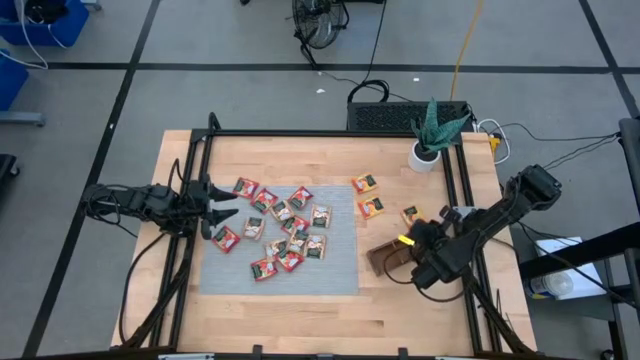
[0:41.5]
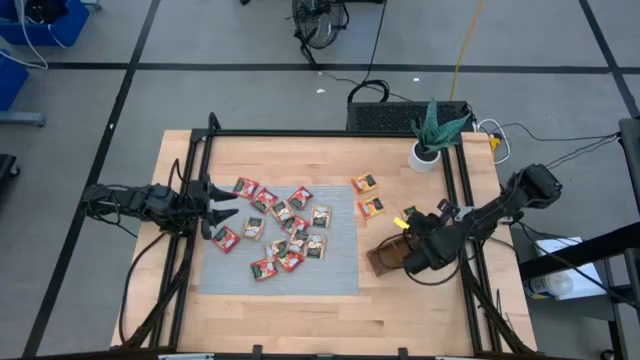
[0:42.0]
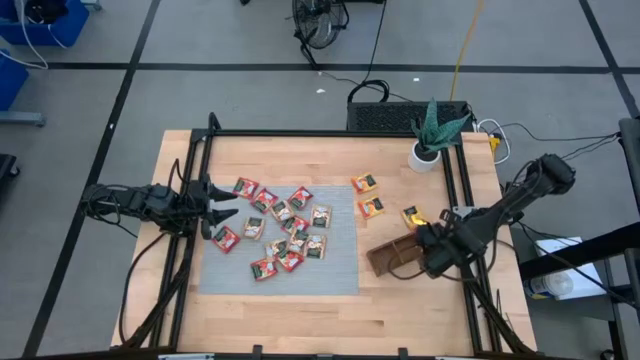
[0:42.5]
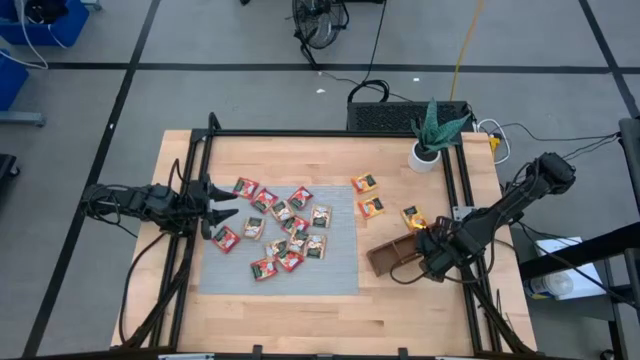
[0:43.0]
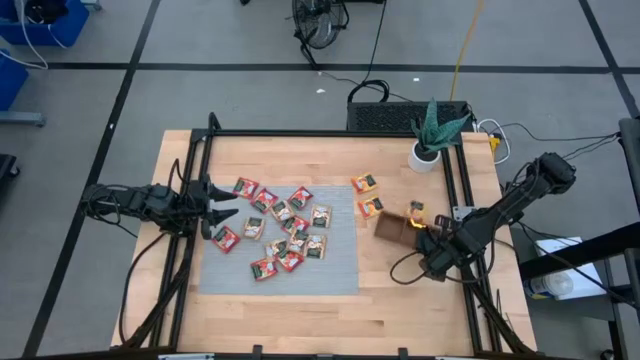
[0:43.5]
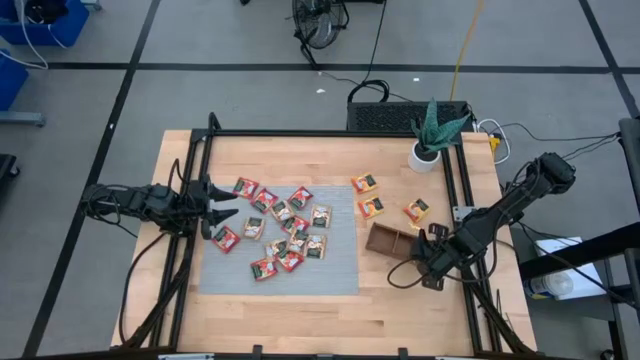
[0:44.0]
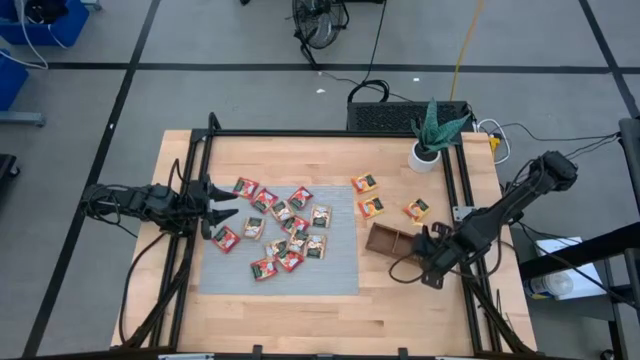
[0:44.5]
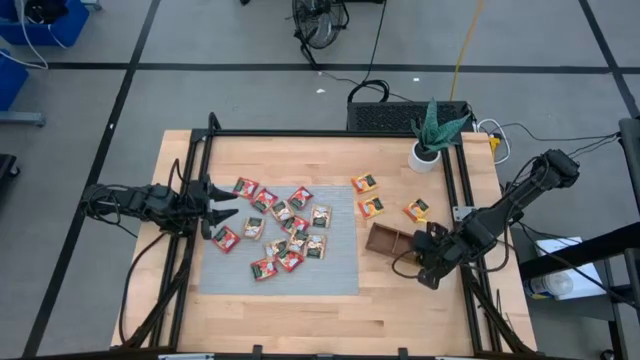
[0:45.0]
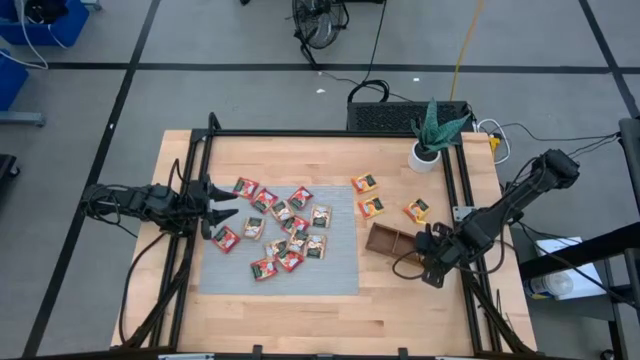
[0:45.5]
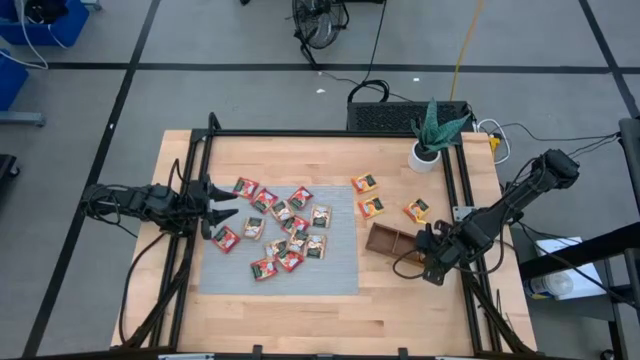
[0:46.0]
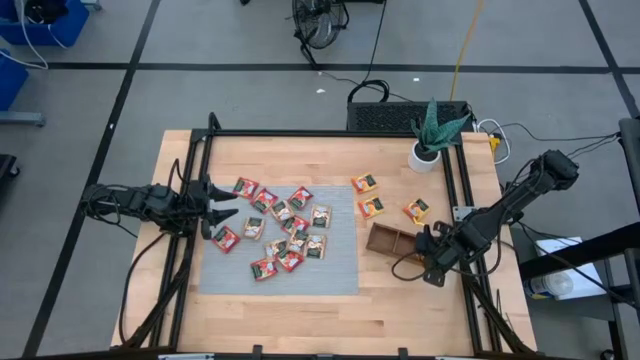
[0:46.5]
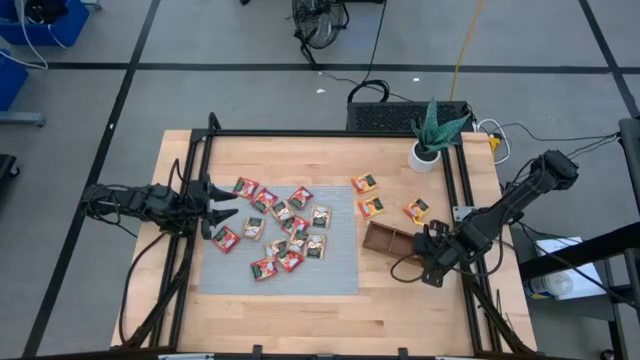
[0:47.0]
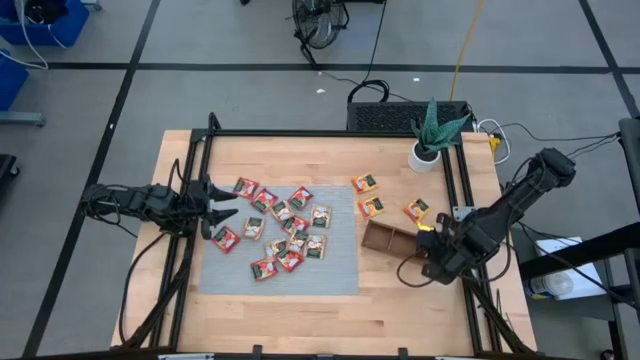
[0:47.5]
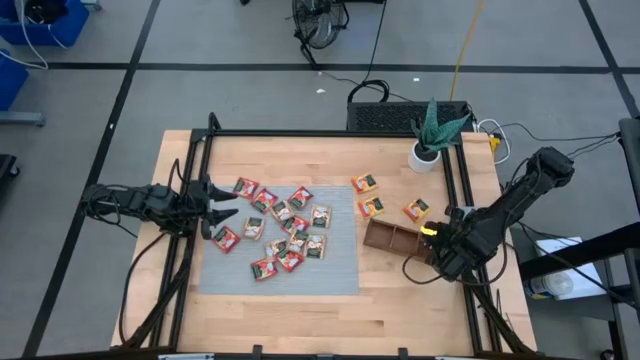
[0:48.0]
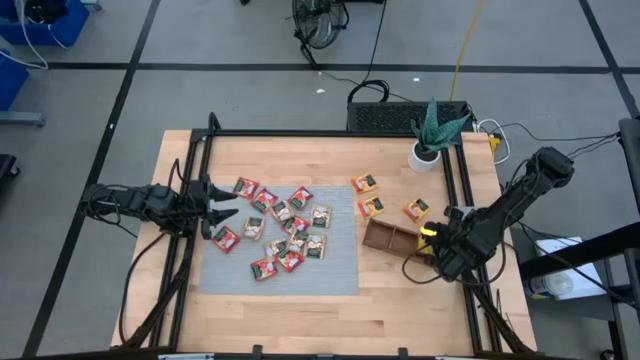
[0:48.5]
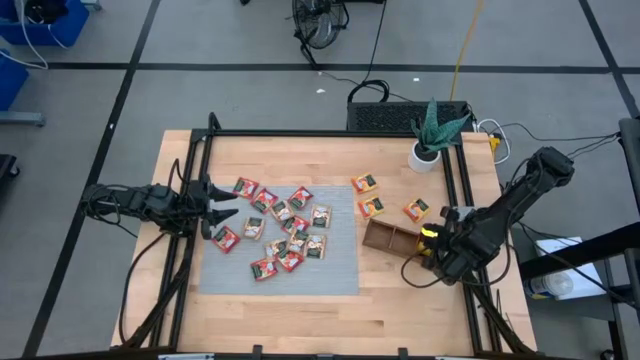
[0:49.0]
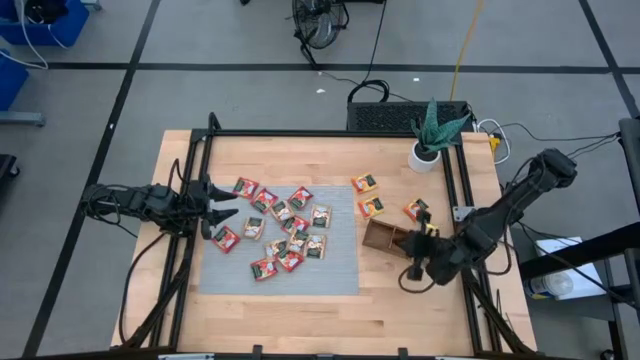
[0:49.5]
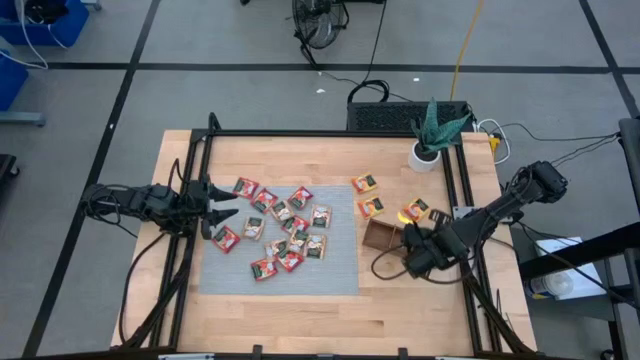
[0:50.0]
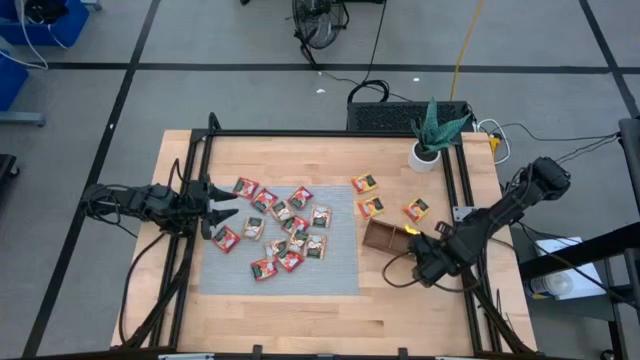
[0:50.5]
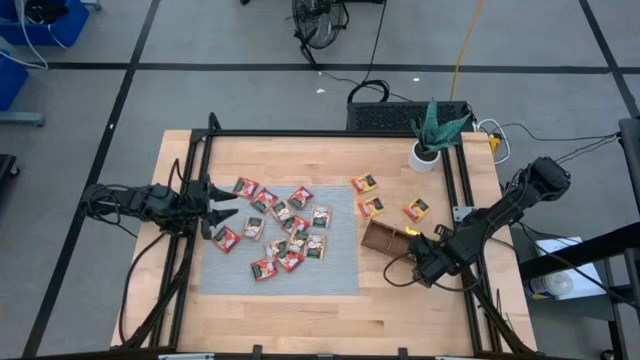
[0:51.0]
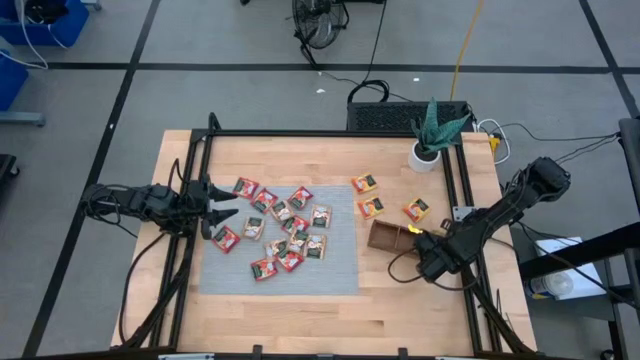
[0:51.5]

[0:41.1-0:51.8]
Task: Pick & Place Tea
Adjust the yellow tea bag in the right section of the wooden organizer

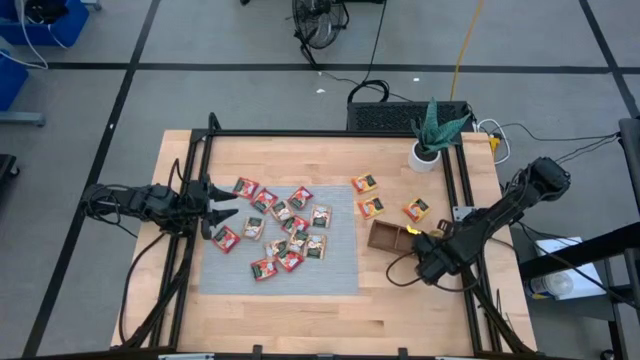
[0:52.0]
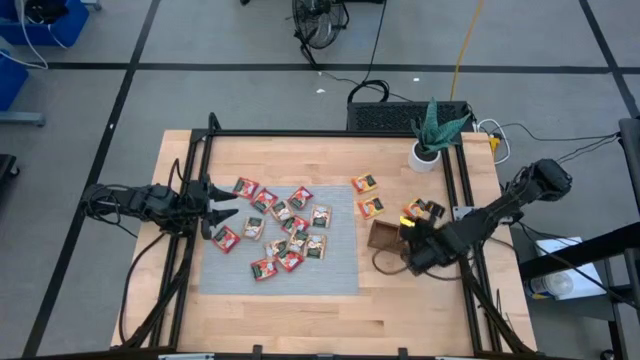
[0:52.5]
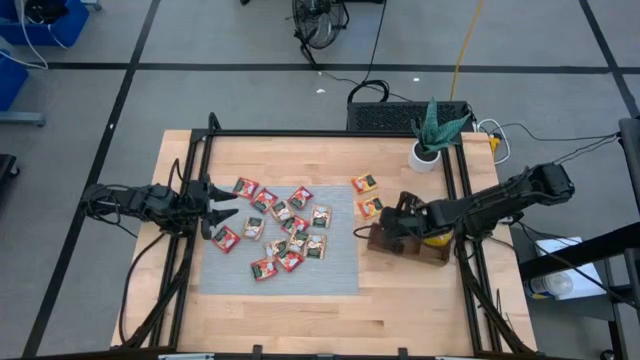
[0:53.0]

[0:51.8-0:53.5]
Adjust the wooden organizer on the table

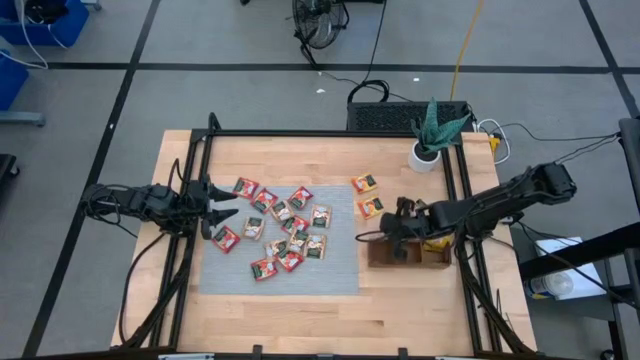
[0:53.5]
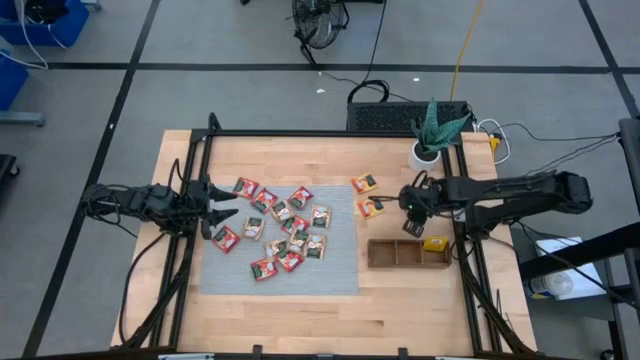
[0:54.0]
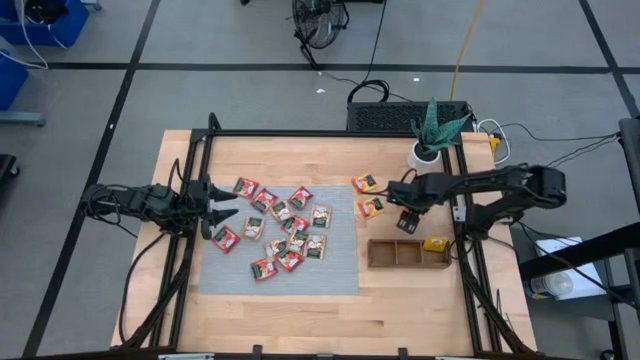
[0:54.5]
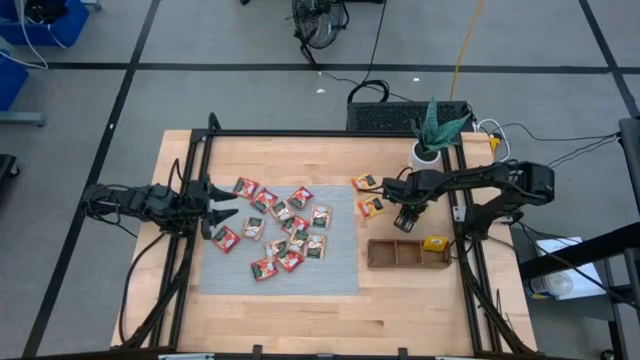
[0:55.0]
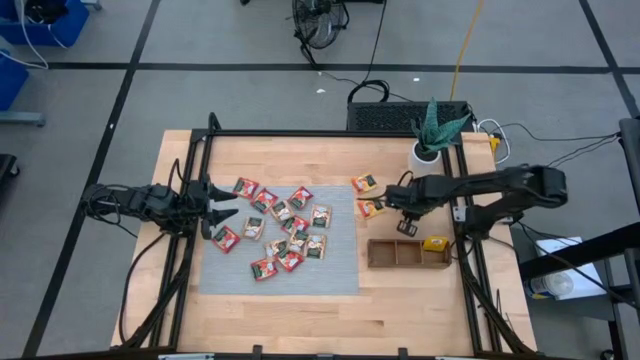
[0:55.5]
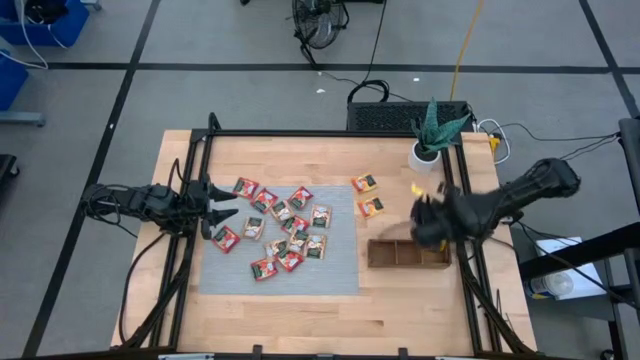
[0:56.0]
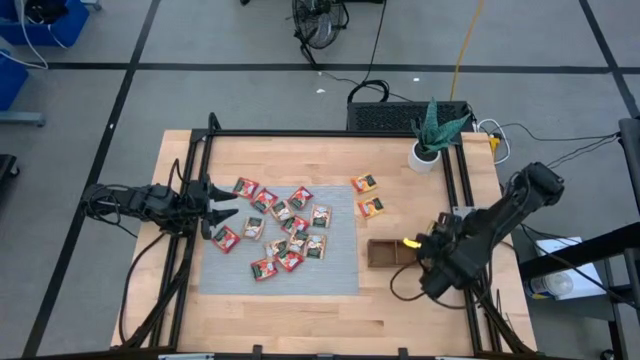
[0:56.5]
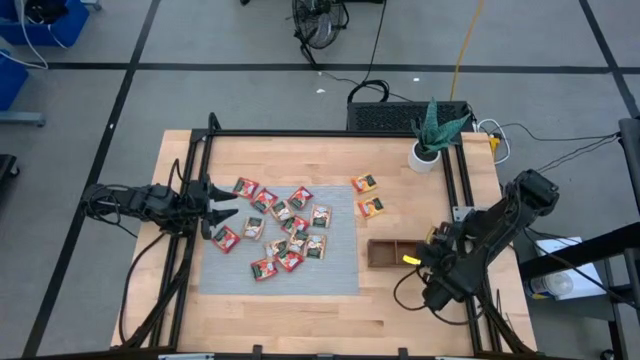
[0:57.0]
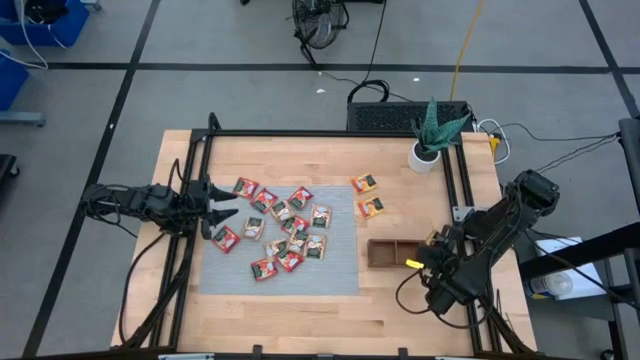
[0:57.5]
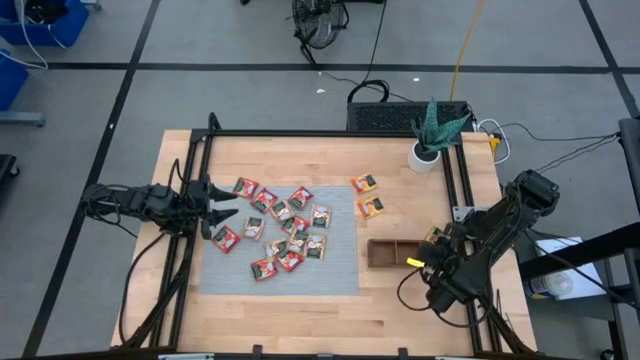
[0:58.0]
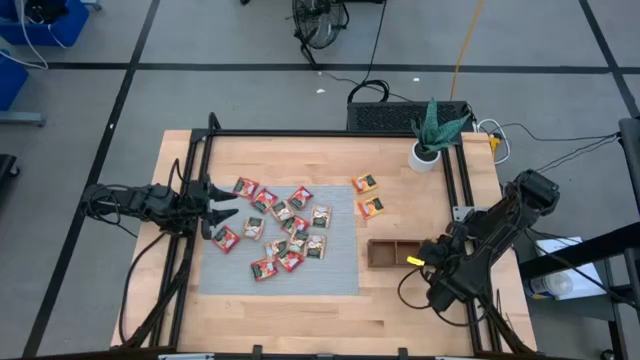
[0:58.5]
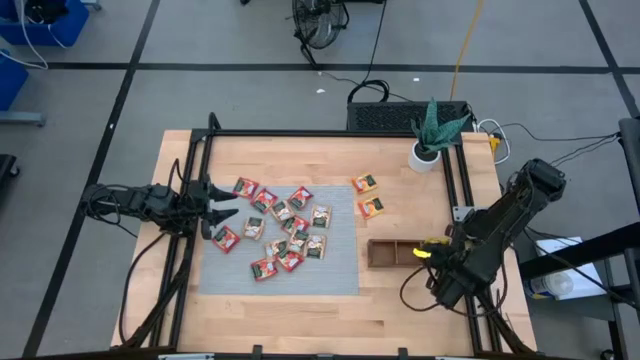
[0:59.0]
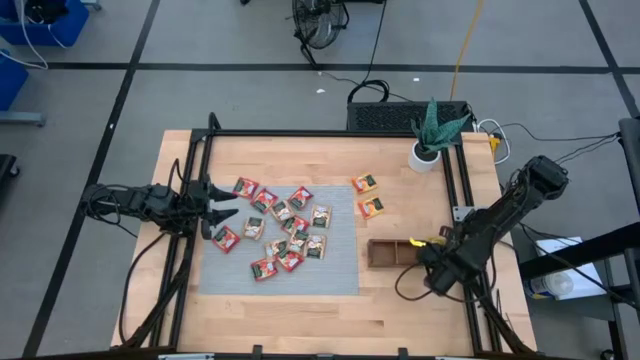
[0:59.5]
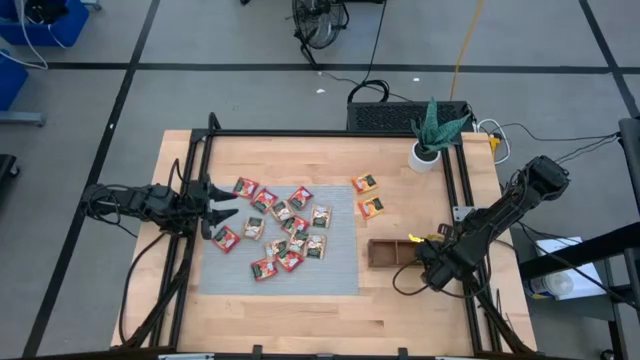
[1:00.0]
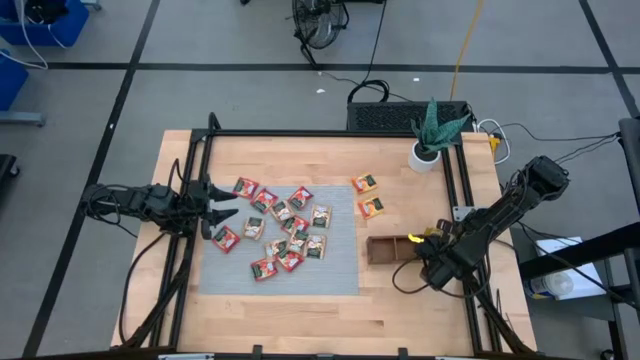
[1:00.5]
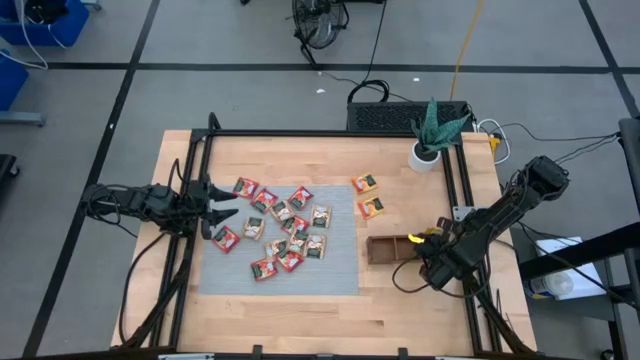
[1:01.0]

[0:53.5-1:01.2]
Put the yellow tea bag into the right section of the wooden organizer

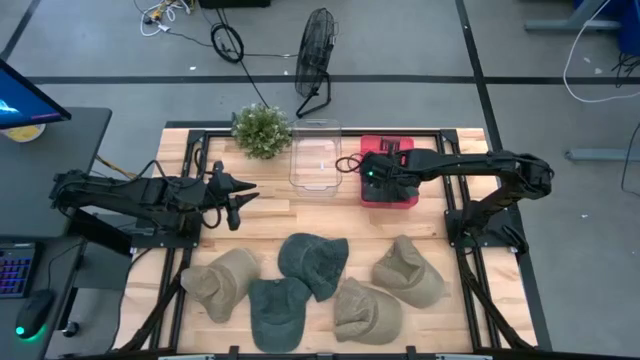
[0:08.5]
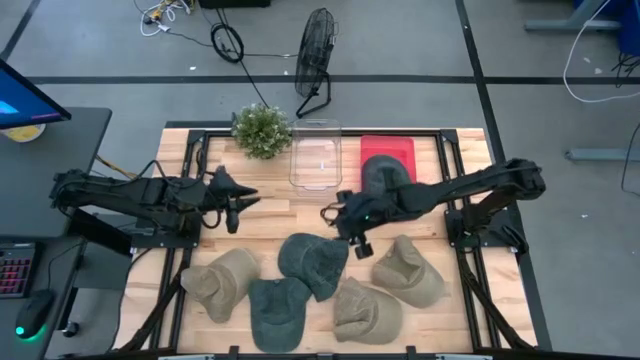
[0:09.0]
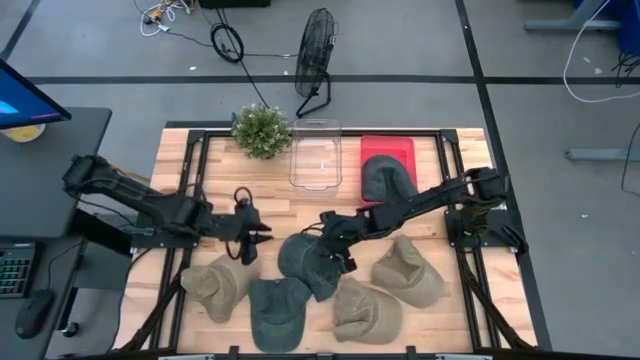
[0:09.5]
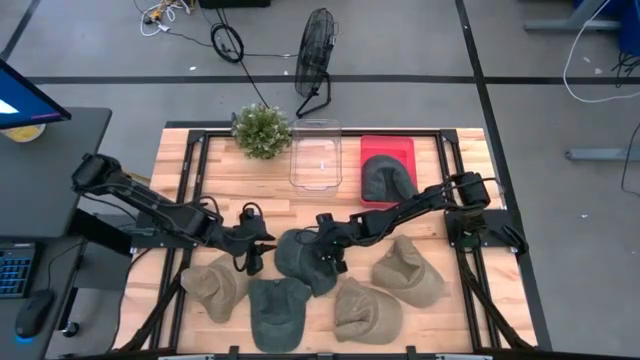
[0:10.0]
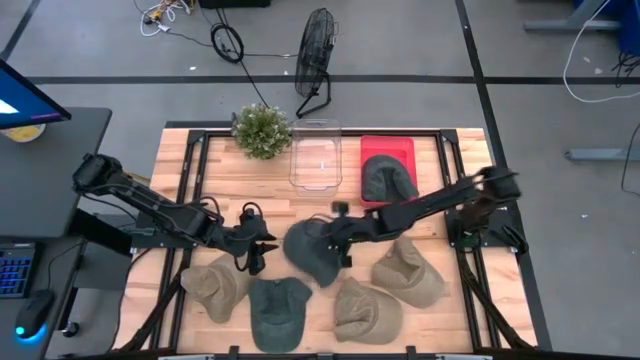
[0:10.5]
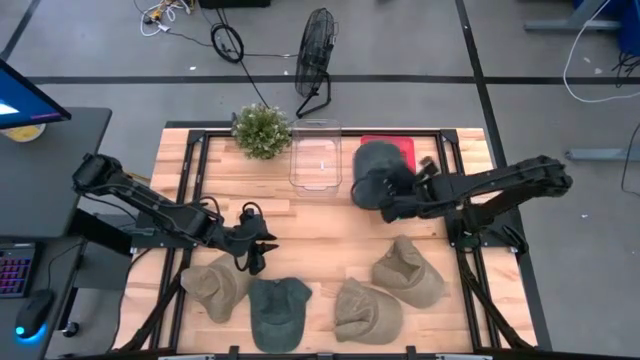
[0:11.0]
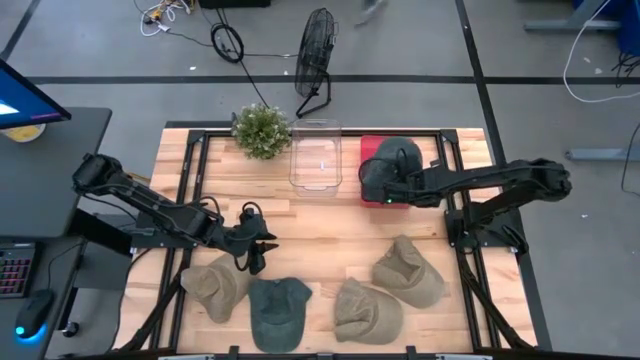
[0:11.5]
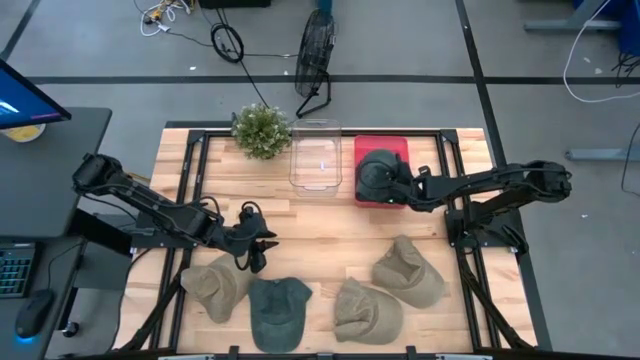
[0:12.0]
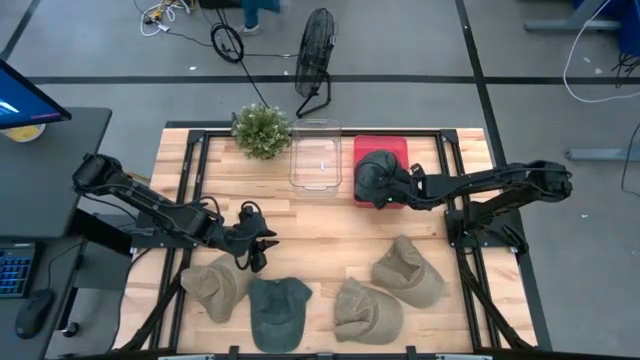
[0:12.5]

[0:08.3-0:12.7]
Task: Pick & Place hat
Put the top gray cap into the red bin
